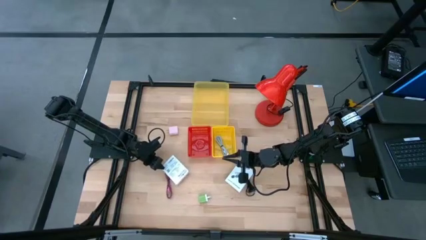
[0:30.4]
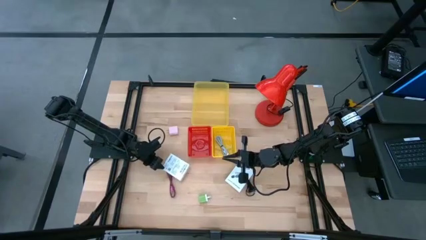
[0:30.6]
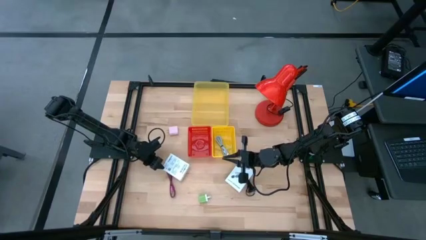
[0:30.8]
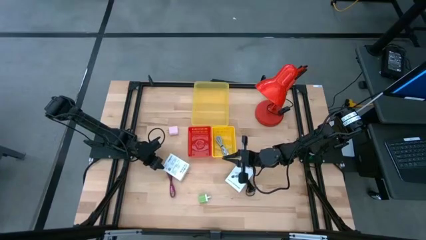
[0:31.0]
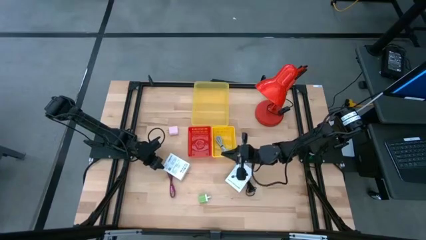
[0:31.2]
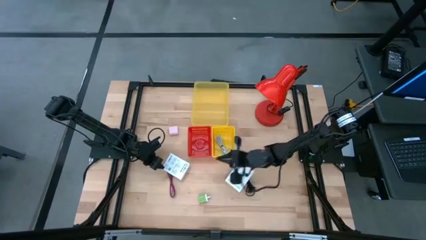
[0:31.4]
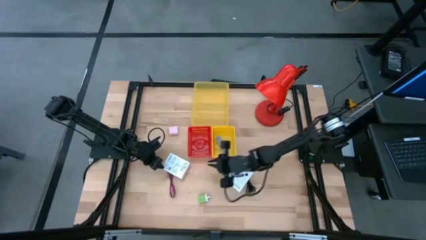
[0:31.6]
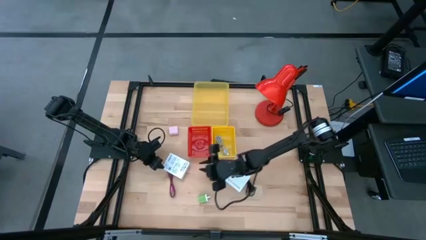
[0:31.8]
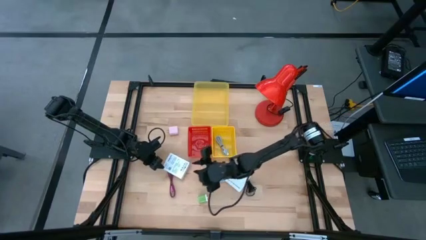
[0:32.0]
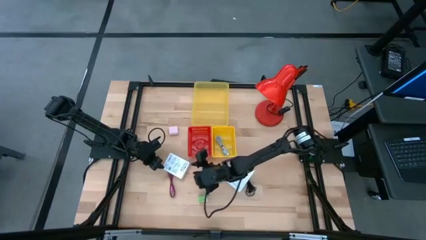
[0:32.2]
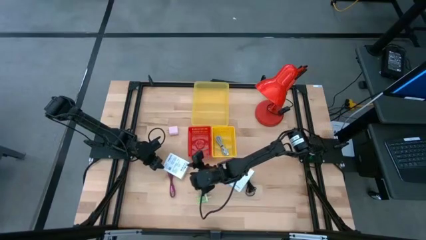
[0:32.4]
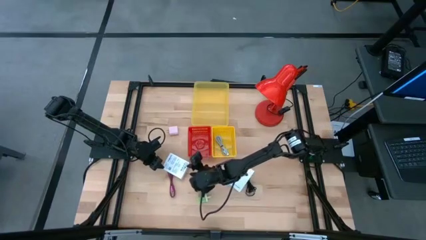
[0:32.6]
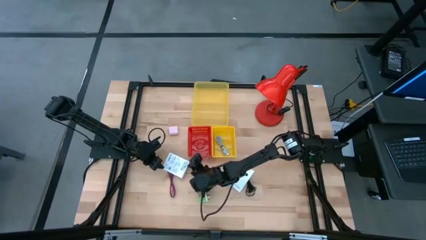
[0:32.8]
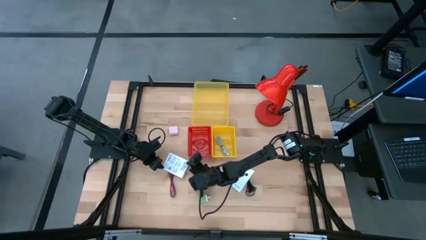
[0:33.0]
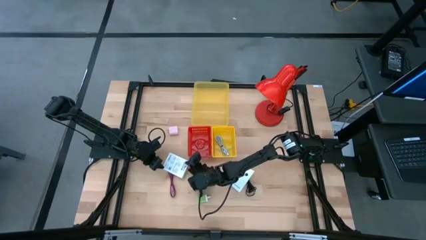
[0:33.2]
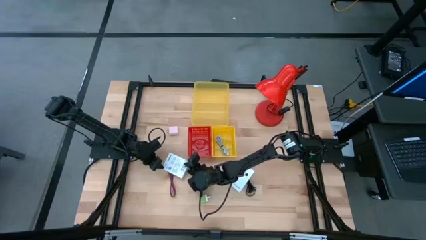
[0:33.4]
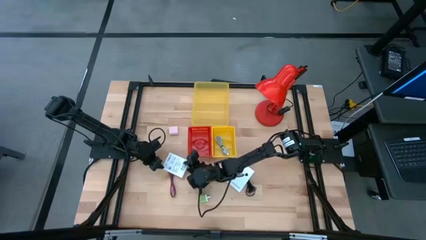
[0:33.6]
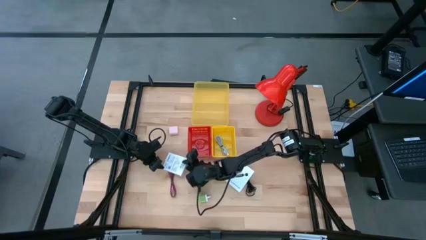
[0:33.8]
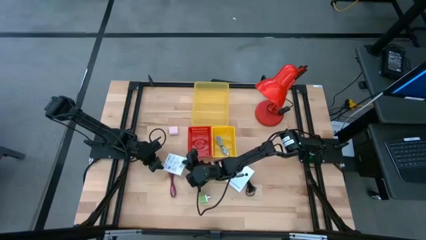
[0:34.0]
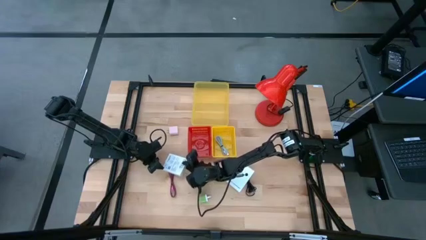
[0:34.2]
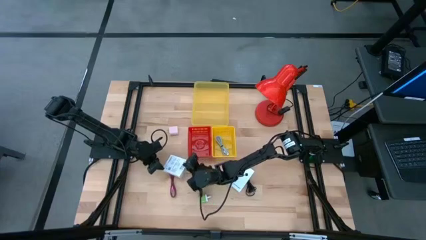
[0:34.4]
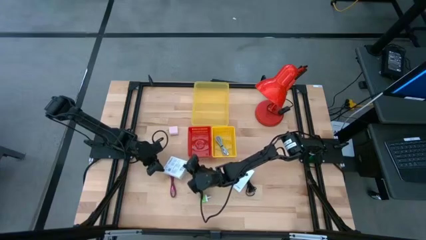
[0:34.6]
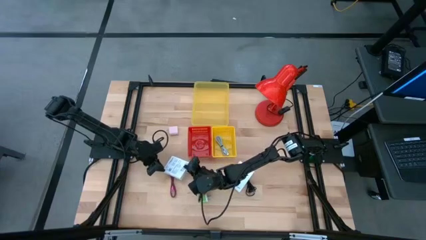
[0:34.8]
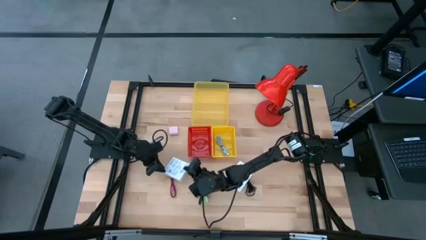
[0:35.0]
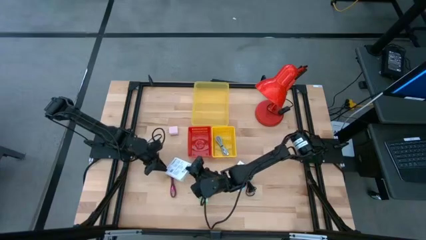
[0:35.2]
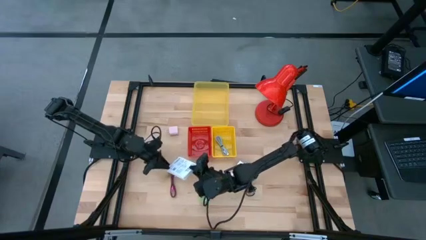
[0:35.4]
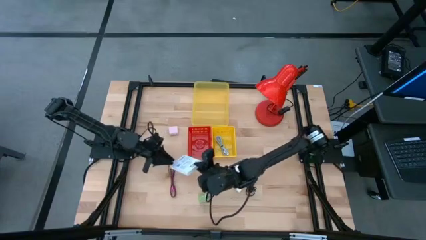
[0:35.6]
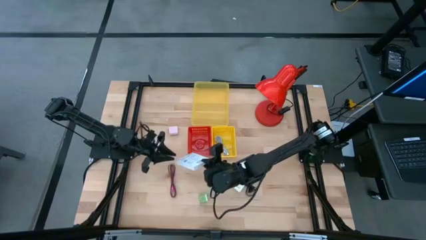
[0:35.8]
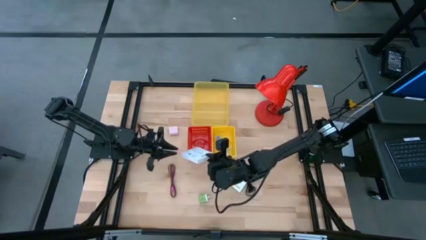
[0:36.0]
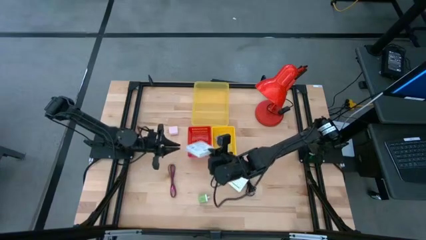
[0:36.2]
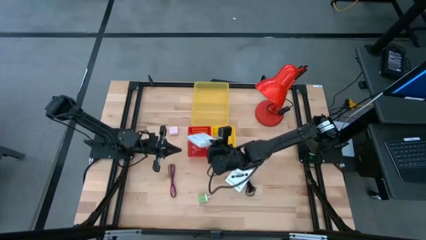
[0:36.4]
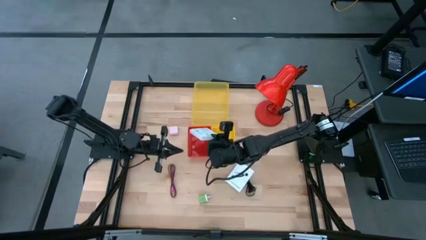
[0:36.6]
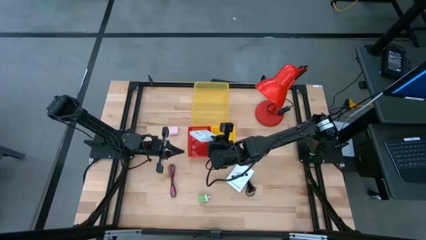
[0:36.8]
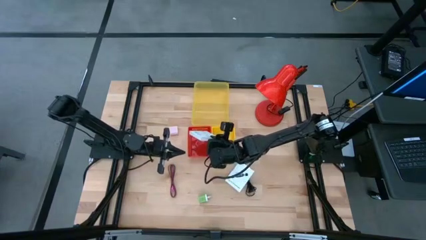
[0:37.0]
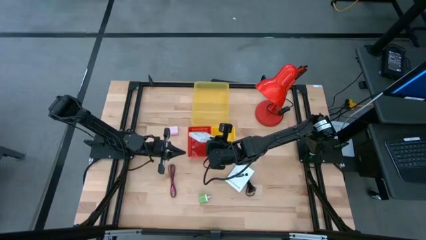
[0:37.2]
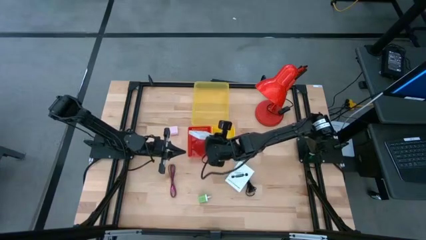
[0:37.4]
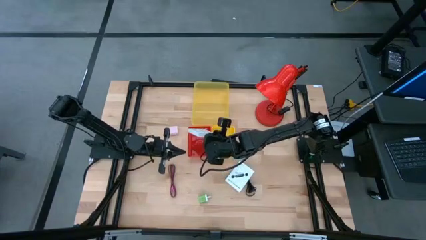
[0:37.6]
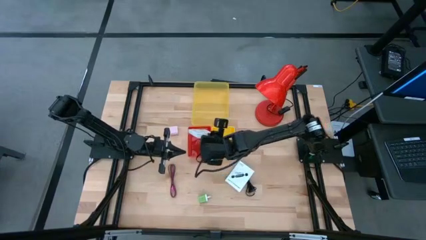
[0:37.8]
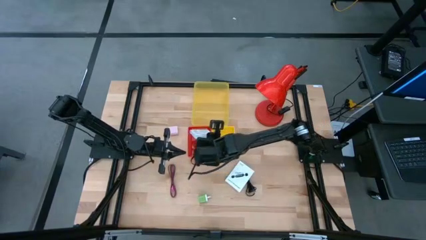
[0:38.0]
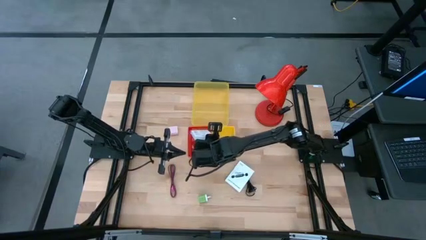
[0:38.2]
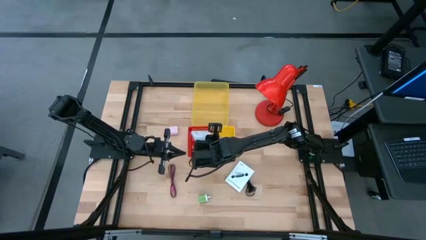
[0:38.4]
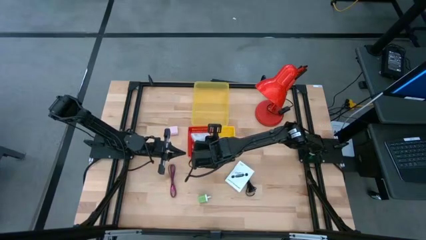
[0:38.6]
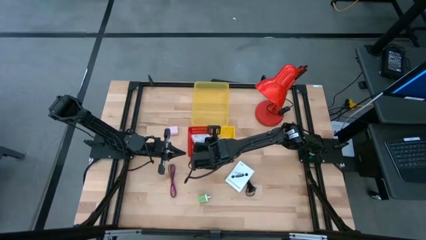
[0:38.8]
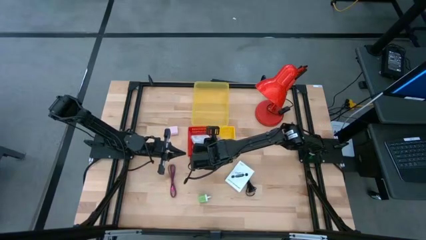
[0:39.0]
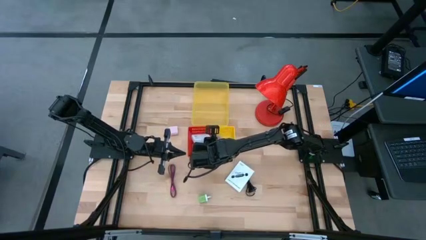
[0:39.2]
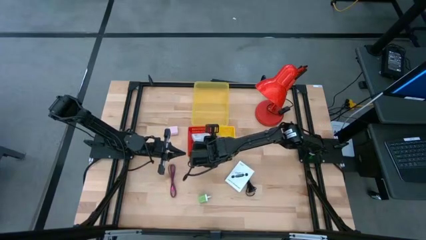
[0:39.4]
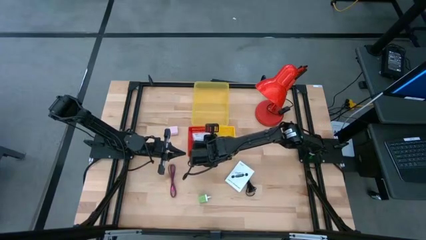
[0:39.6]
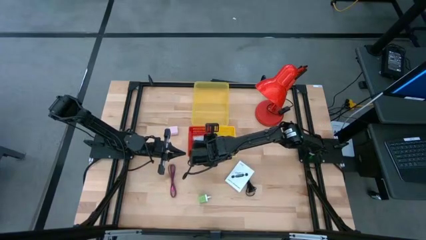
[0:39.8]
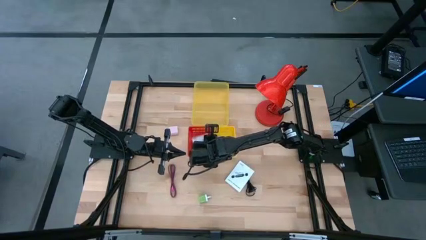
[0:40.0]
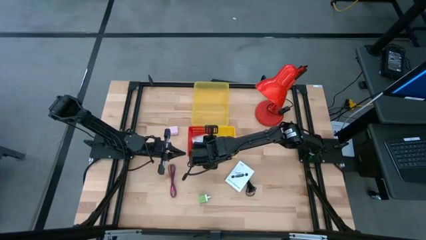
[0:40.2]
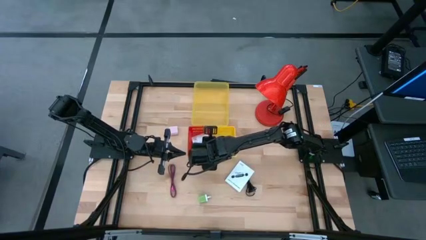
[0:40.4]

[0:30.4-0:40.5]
Task: Pick and place items into bin
Put the left card reader box into the red bin

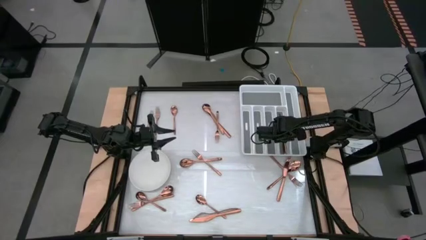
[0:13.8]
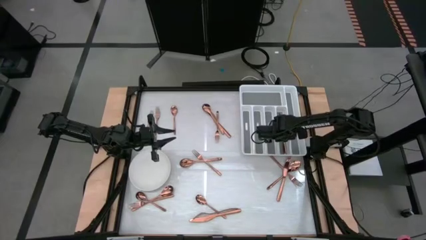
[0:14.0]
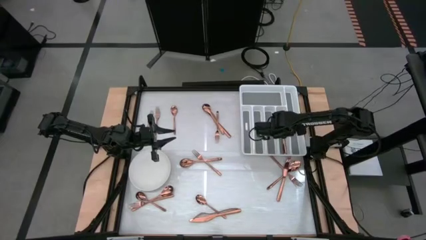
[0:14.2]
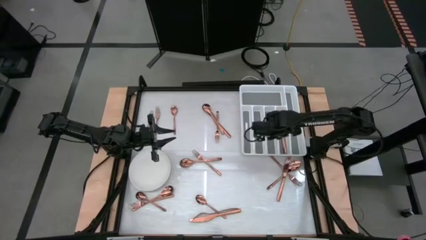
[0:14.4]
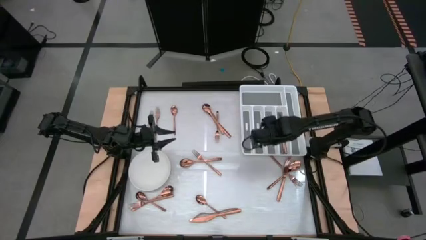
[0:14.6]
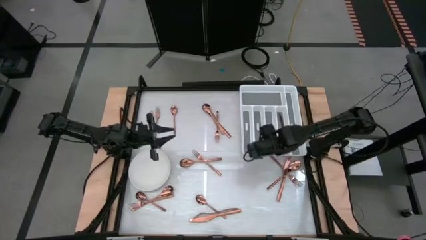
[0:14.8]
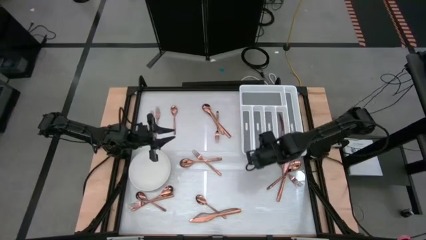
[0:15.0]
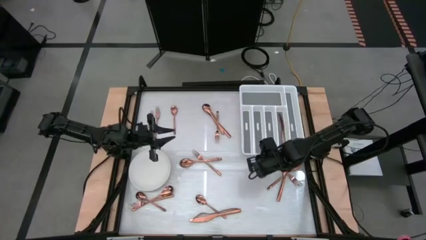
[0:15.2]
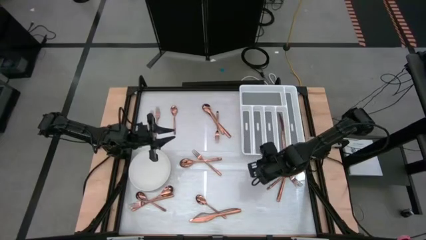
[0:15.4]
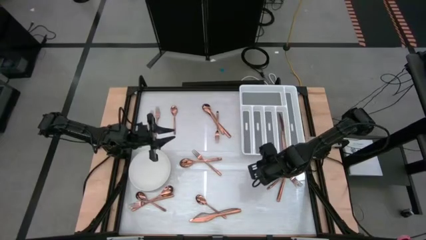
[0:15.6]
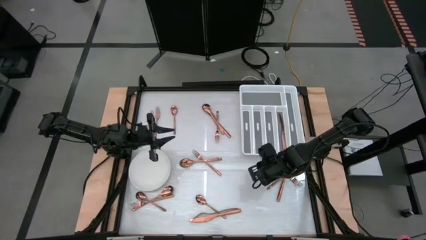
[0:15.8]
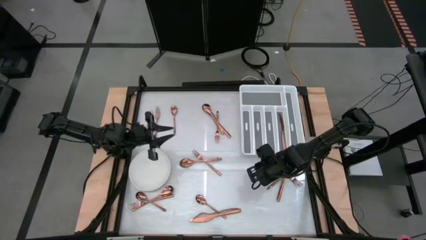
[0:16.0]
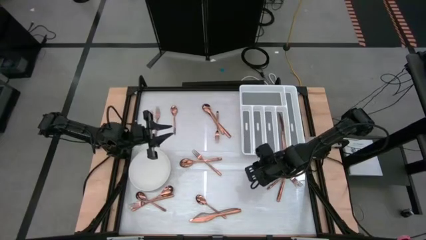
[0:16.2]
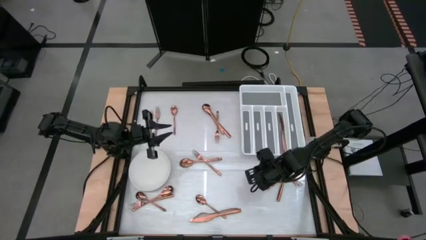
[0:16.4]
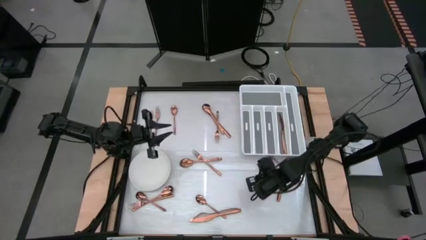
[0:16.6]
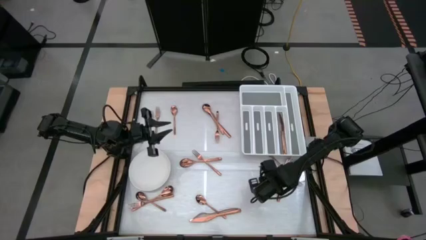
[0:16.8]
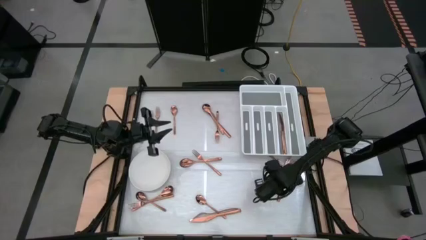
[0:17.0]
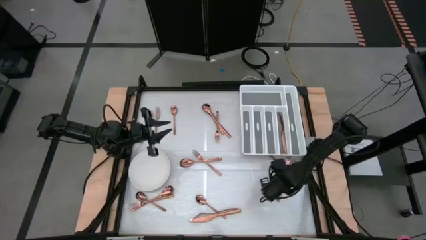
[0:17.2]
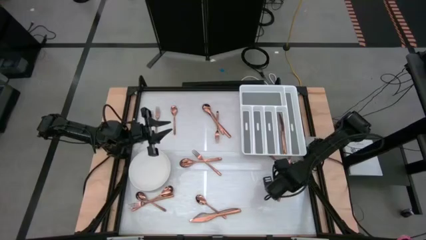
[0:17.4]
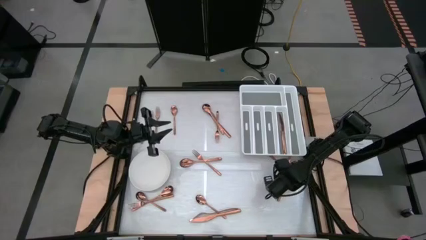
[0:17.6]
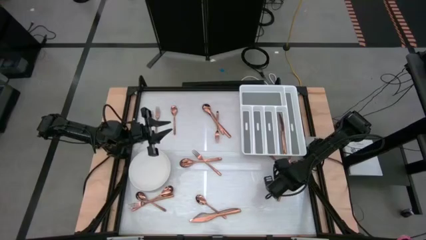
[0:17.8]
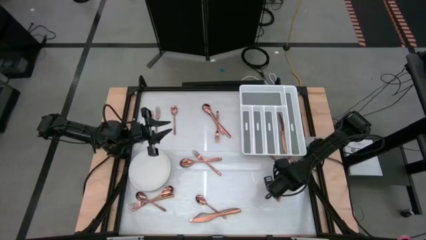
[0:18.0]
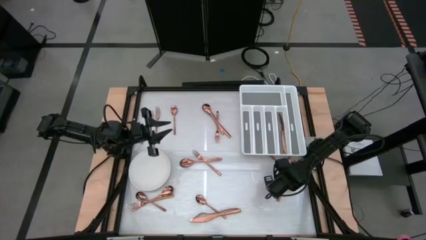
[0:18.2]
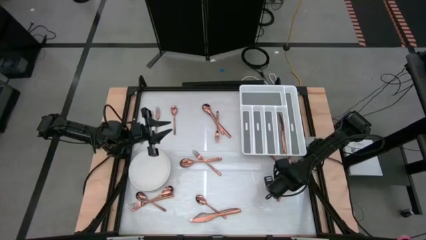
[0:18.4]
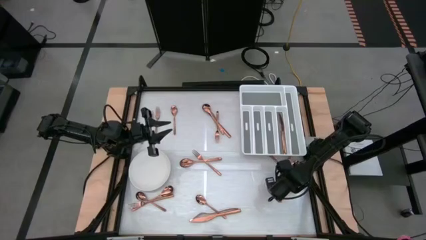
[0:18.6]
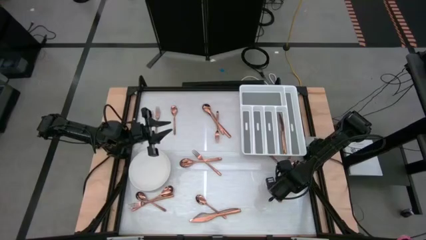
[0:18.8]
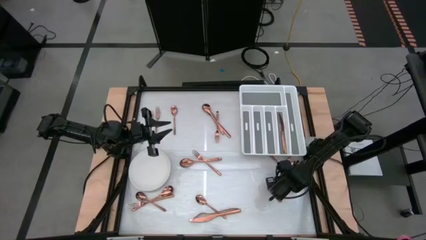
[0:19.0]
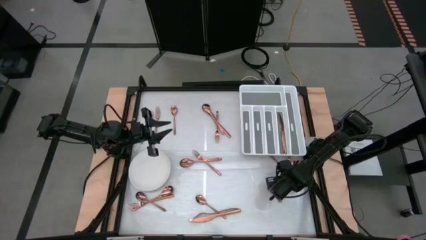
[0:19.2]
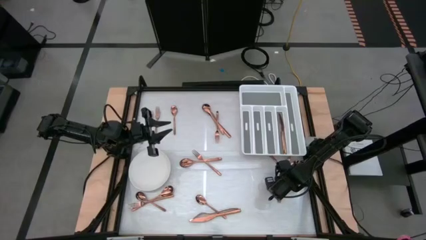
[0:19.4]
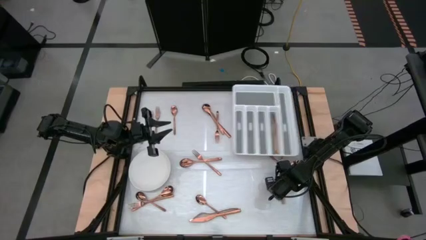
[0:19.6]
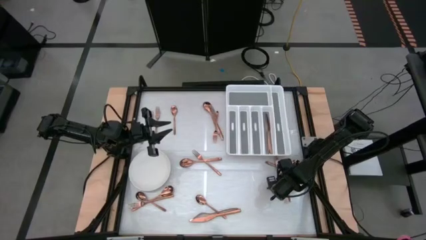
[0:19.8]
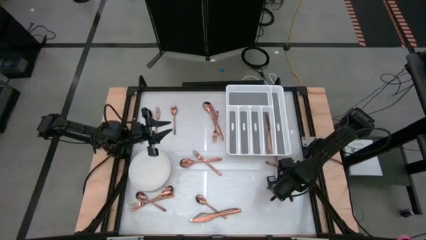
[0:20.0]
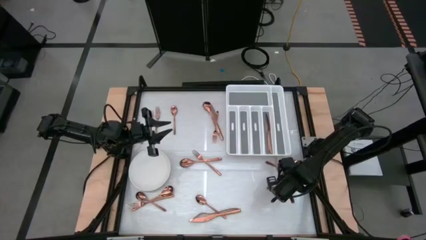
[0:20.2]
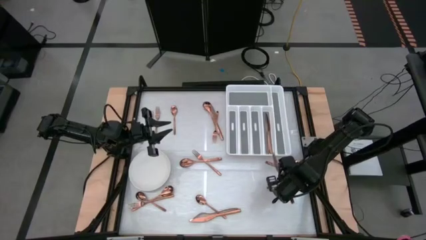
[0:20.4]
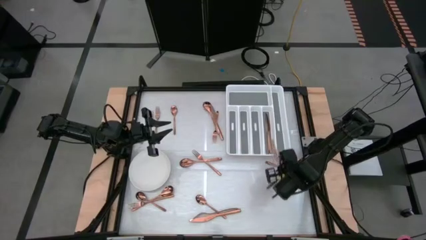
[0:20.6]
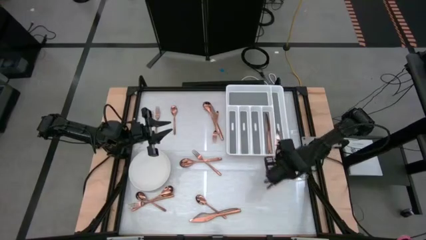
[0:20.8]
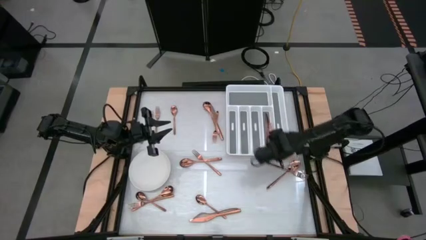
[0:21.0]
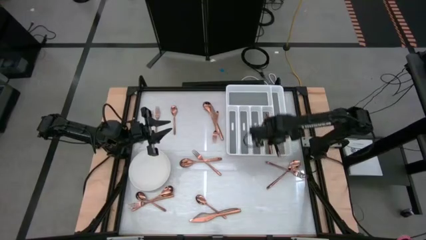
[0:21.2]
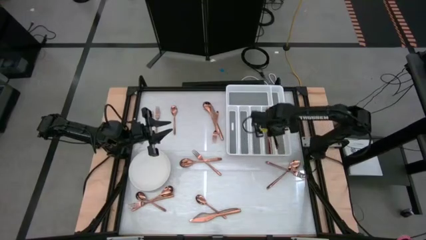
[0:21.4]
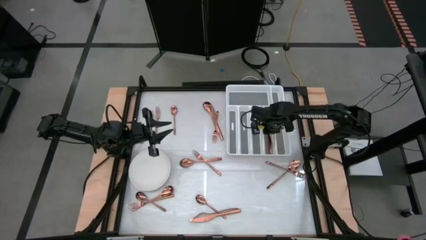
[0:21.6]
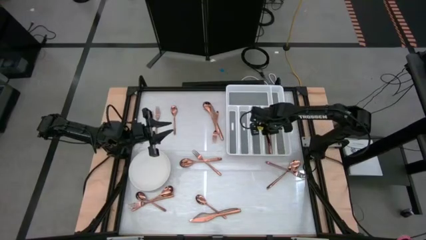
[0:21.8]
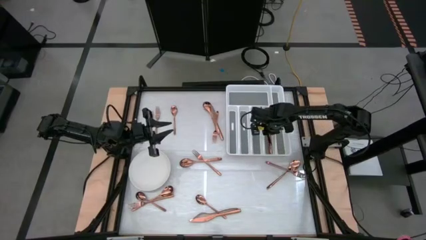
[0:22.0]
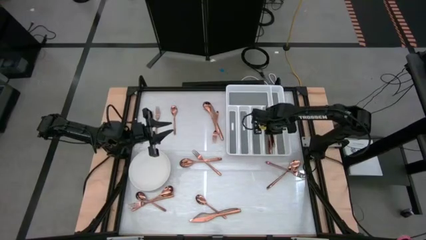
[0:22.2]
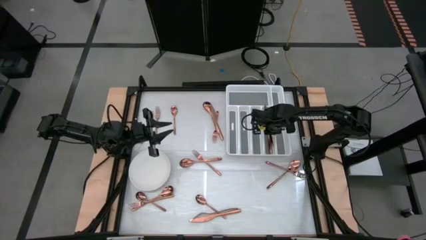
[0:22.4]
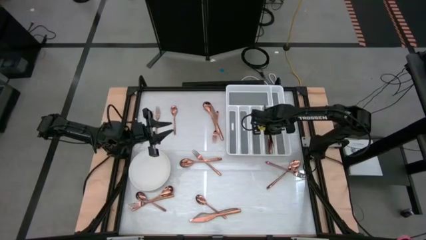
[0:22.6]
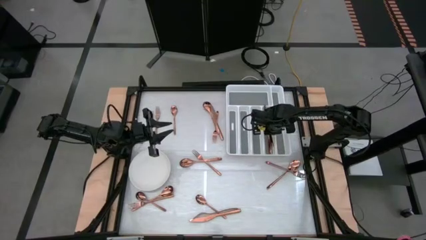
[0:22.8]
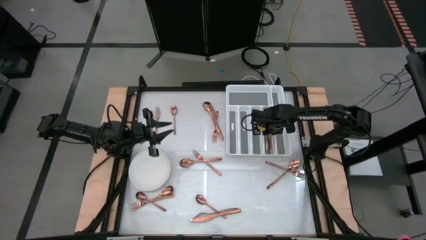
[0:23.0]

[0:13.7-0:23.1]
Task: Sort silverware
Put the bronze knife into the silverware tray
